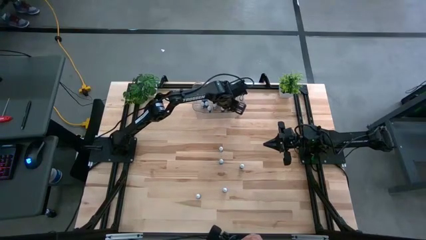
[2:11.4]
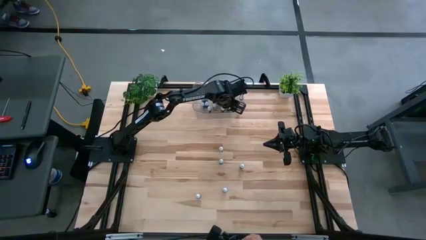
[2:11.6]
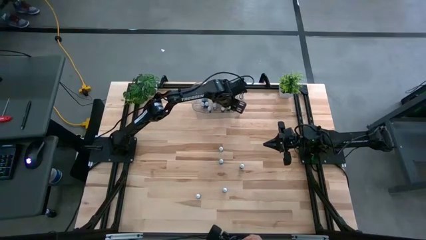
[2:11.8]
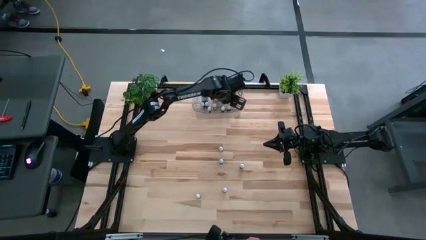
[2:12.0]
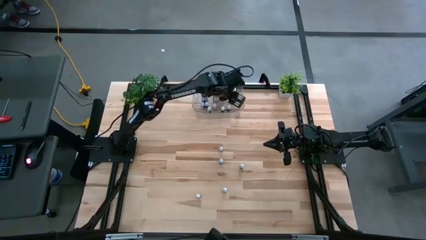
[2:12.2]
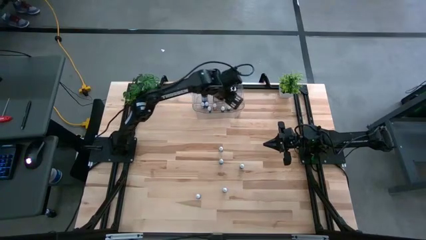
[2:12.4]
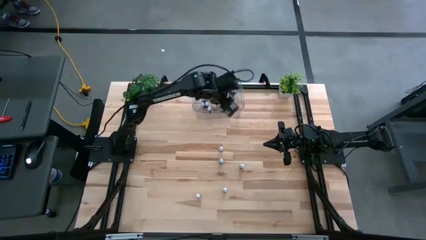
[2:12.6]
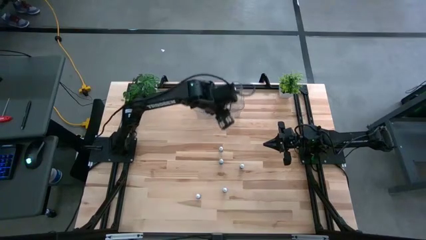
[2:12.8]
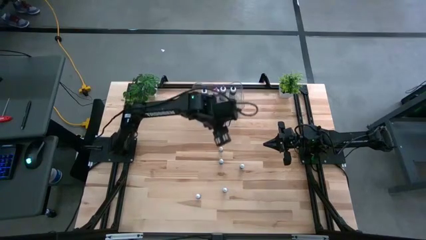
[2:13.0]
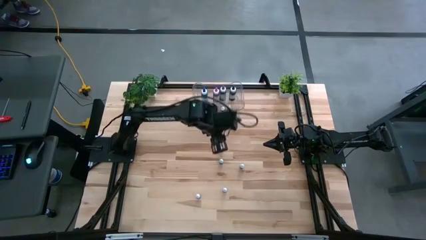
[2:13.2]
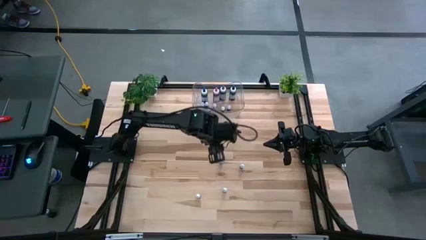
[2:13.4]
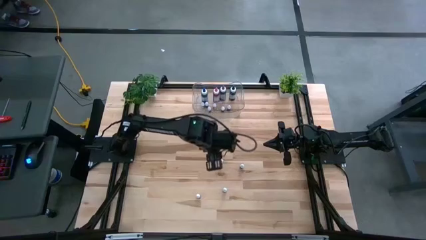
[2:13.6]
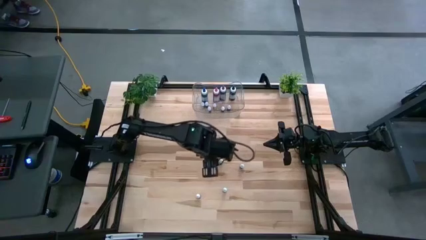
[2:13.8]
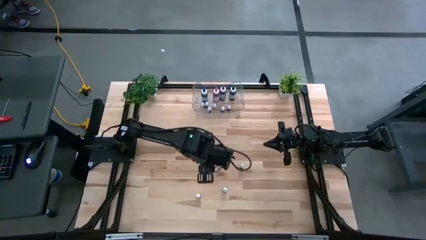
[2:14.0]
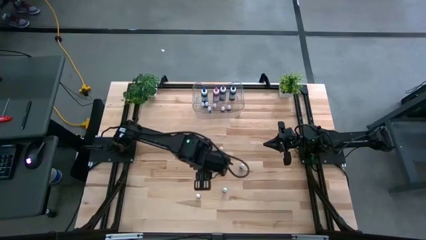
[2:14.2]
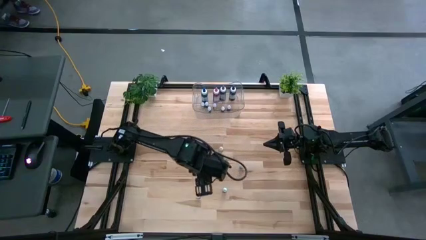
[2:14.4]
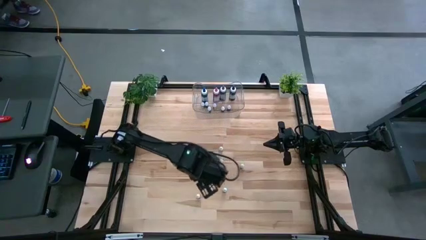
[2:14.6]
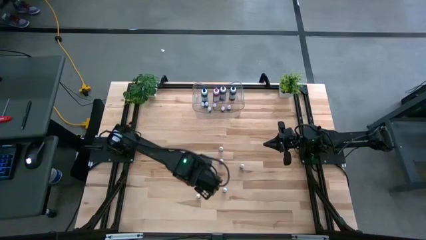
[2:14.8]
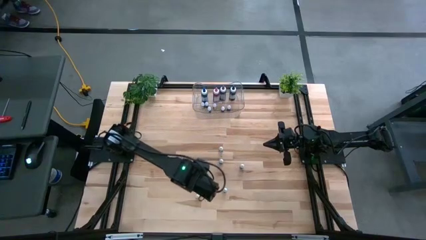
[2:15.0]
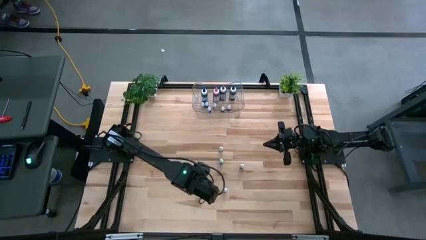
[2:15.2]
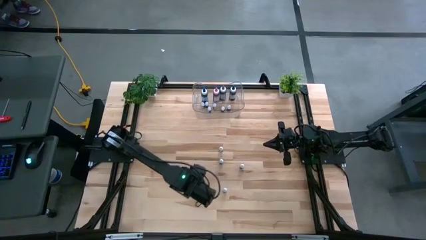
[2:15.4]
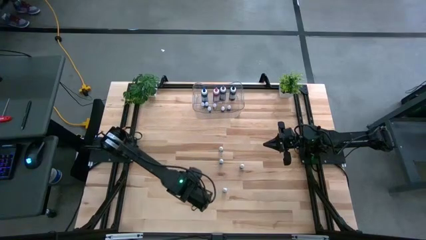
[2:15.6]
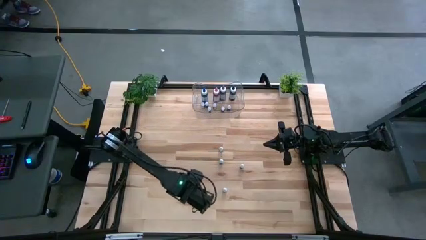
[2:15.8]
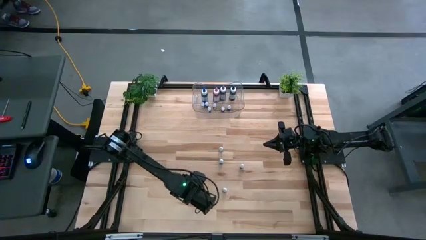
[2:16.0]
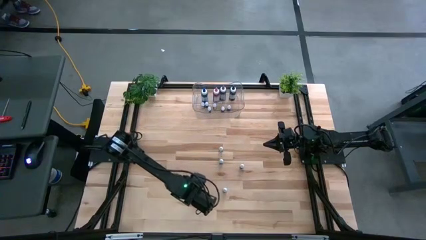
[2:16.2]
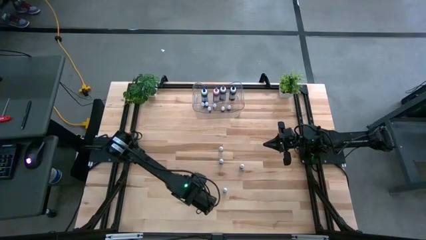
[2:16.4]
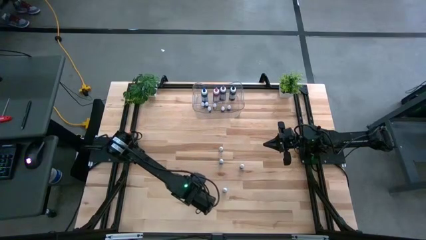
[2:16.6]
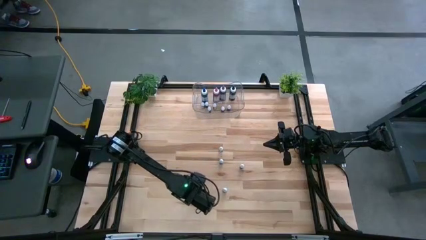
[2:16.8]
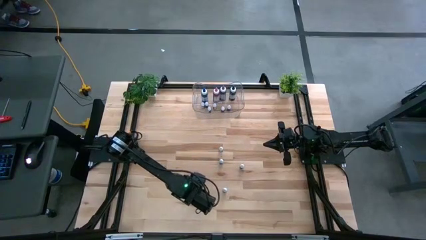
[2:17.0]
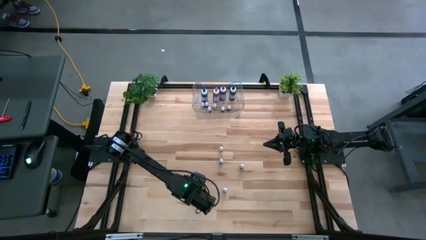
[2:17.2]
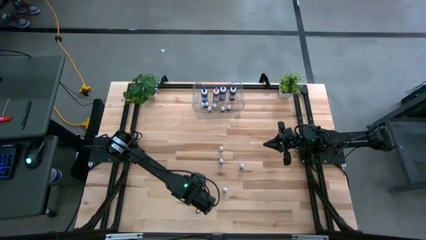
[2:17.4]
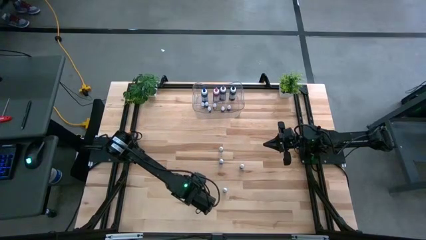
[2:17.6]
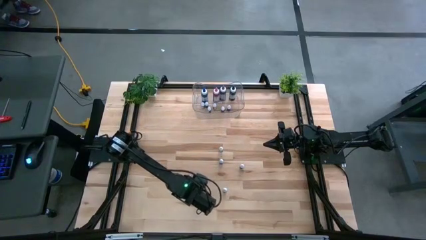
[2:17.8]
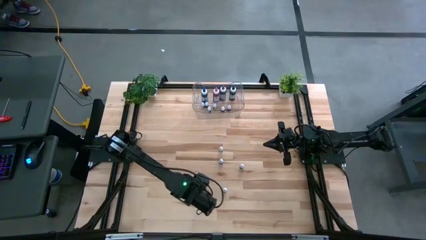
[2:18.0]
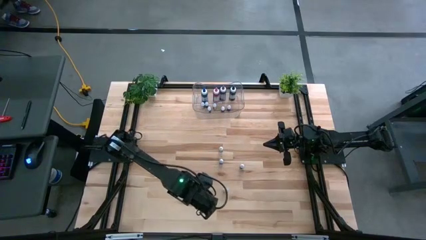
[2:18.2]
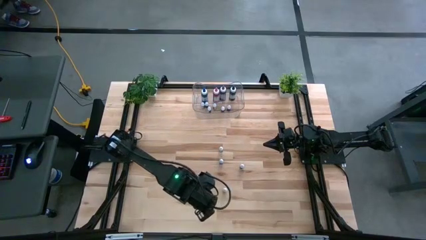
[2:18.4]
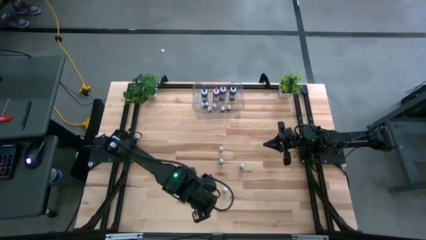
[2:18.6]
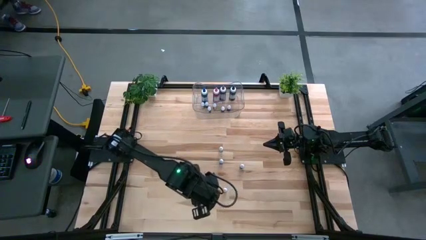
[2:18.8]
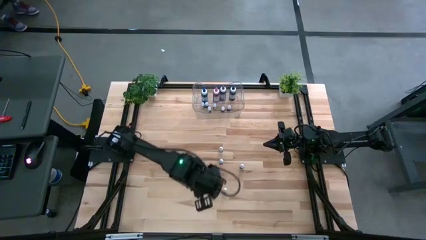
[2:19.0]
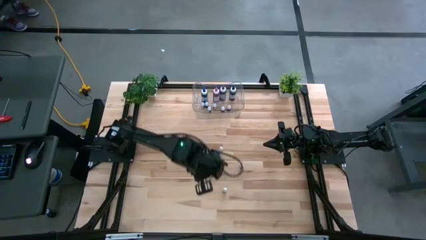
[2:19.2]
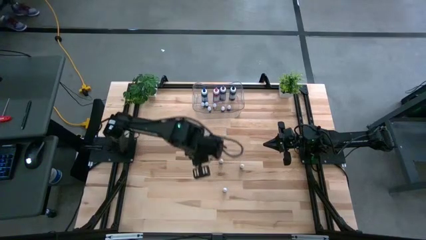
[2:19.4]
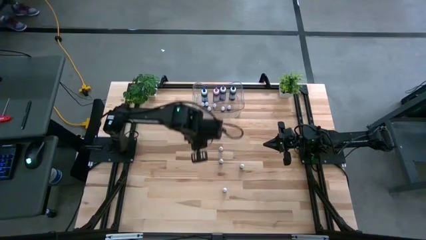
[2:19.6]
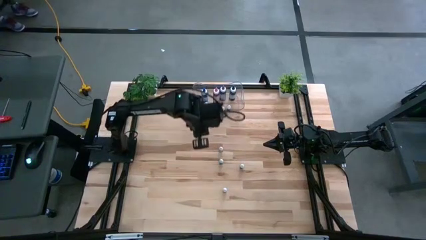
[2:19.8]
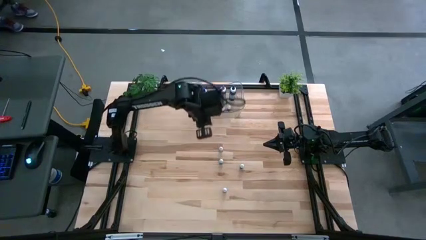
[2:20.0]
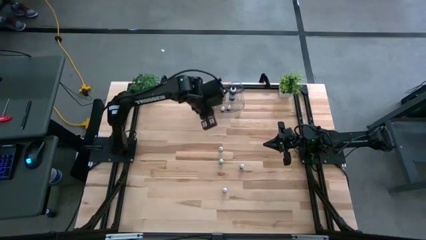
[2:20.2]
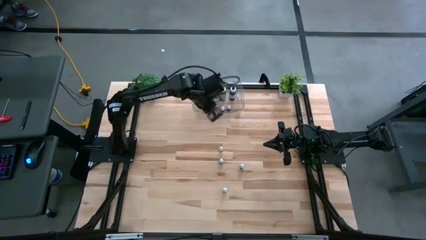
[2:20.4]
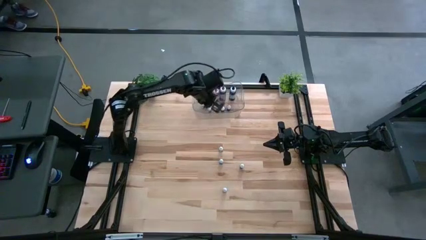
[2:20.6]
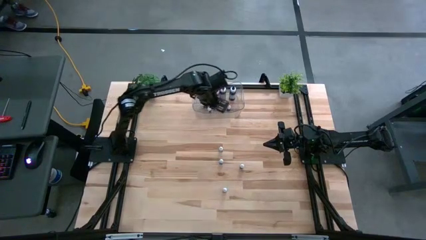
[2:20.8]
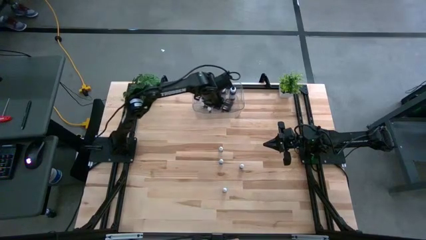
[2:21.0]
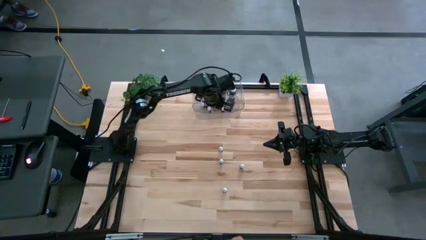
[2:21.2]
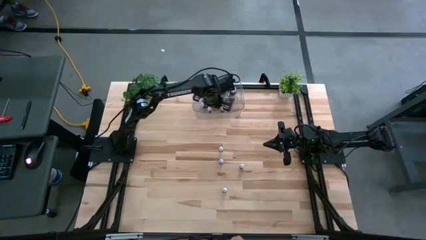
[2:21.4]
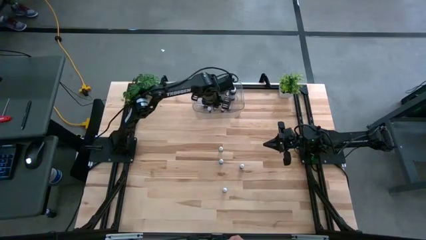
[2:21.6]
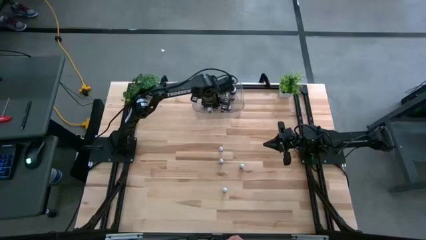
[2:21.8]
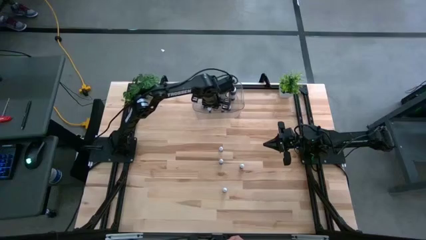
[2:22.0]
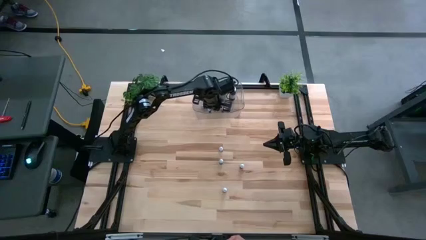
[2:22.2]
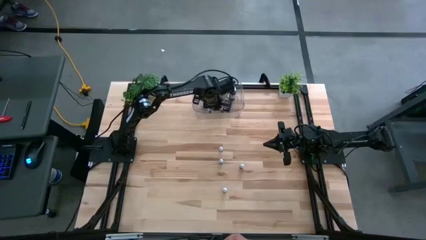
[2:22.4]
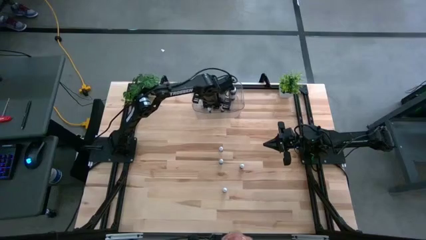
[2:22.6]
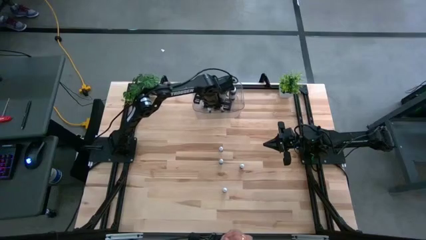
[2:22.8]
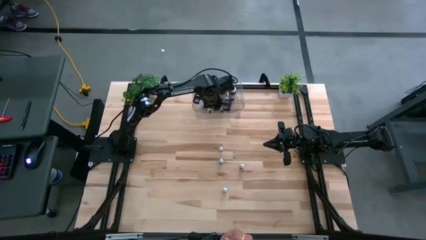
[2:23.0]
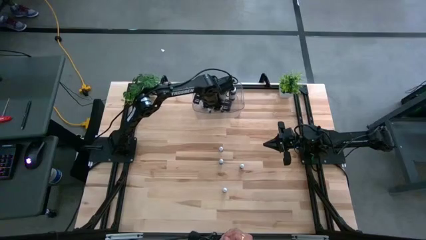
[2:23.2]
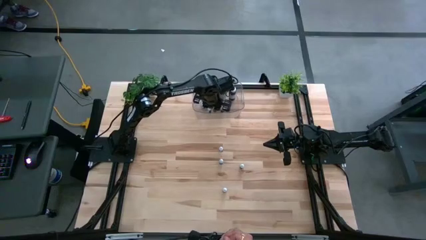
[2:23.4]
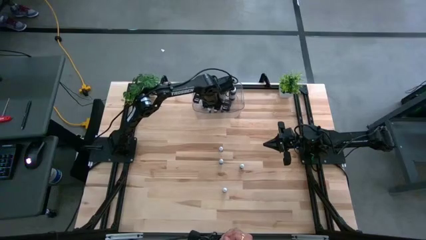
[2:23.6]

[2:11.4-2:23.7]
Task: Pick & Place food coloring
Put the small orange food coloring bottle into the transparent bin
